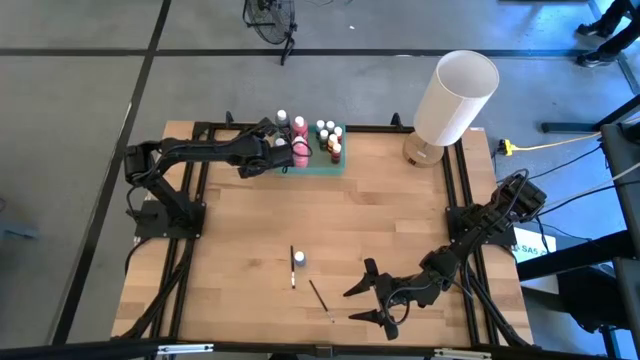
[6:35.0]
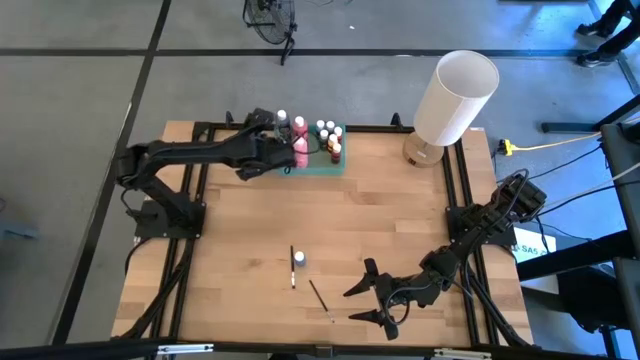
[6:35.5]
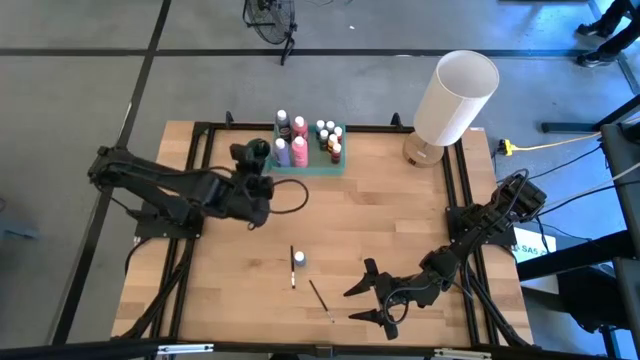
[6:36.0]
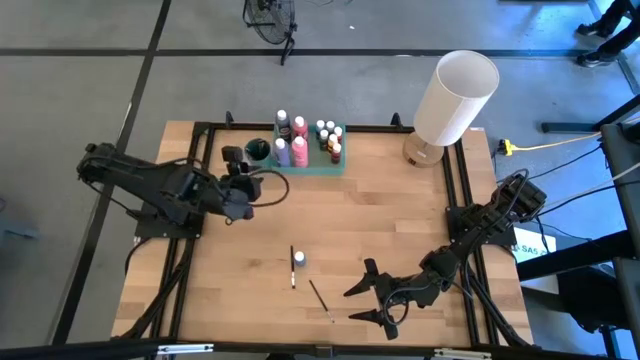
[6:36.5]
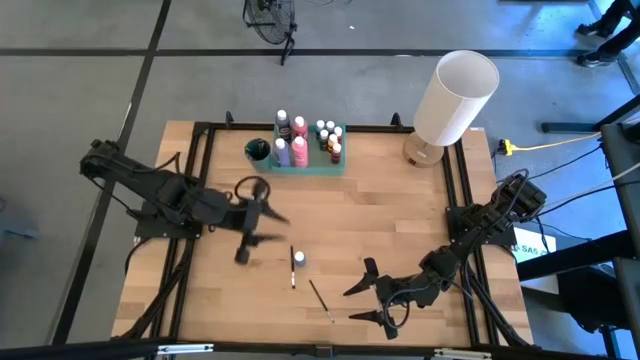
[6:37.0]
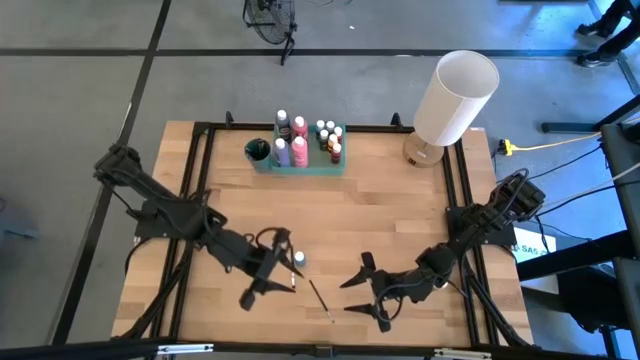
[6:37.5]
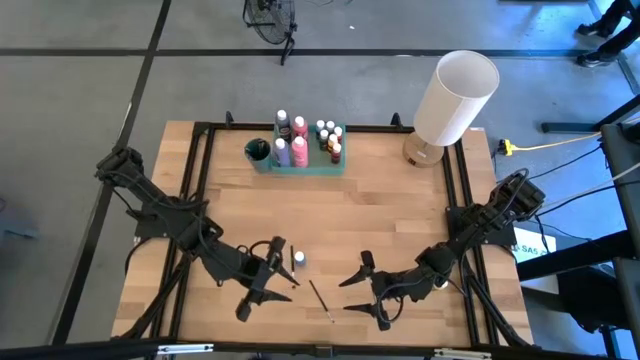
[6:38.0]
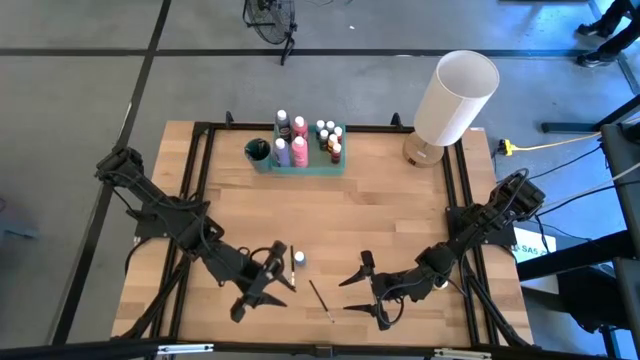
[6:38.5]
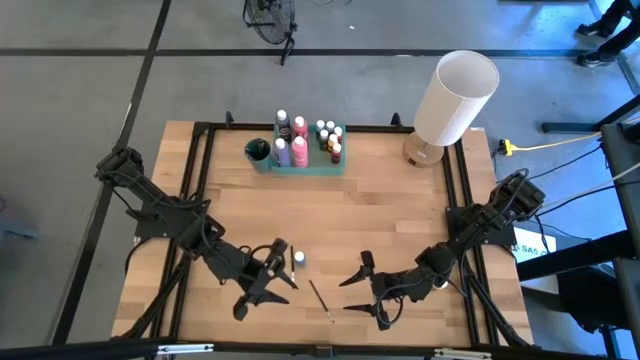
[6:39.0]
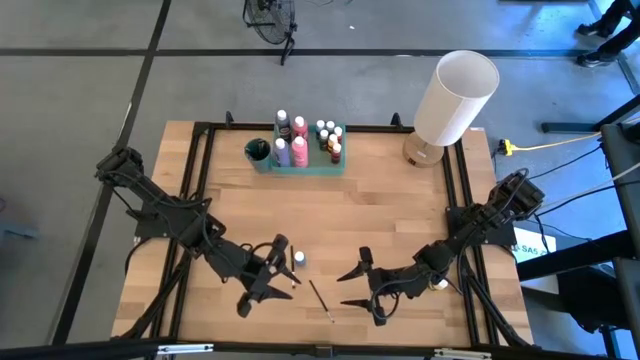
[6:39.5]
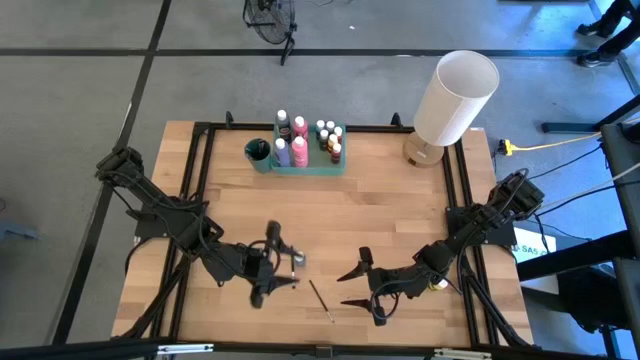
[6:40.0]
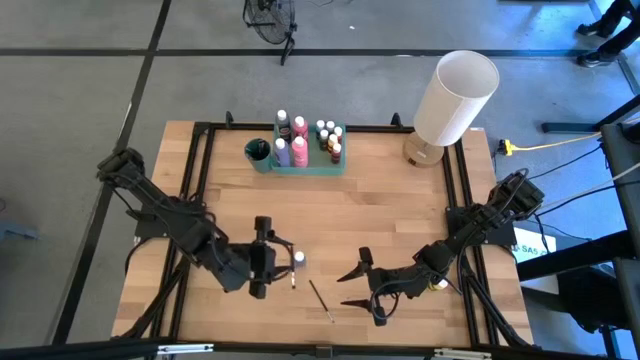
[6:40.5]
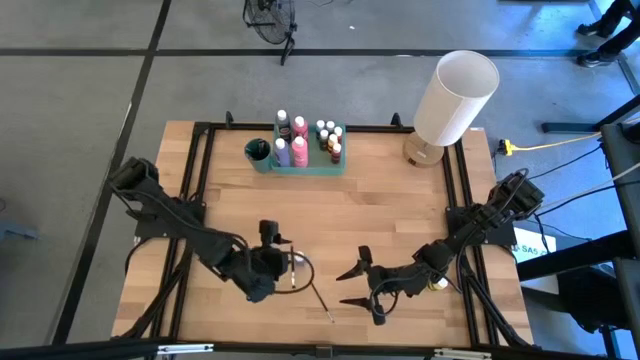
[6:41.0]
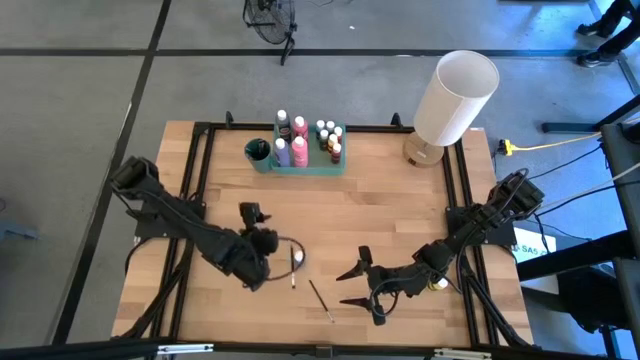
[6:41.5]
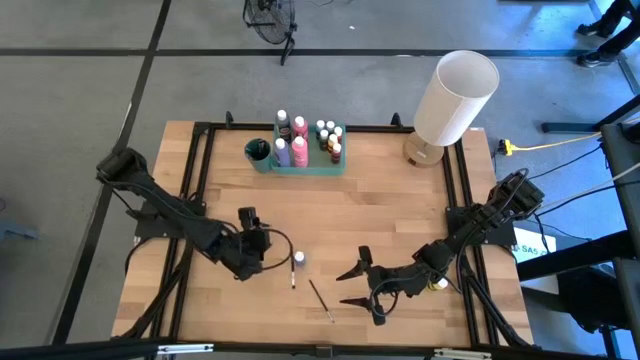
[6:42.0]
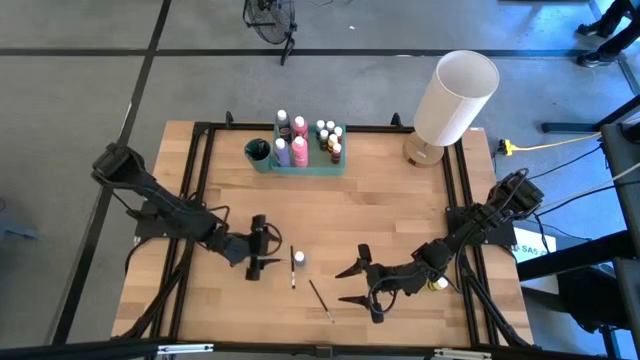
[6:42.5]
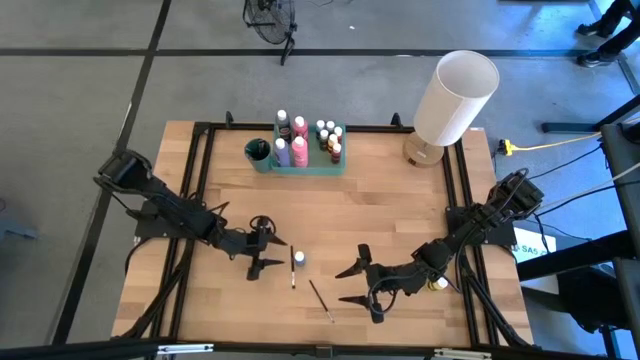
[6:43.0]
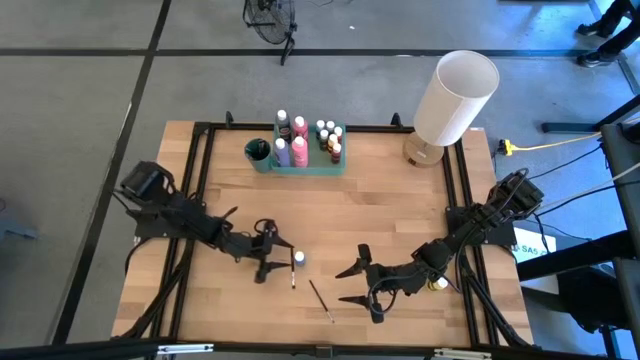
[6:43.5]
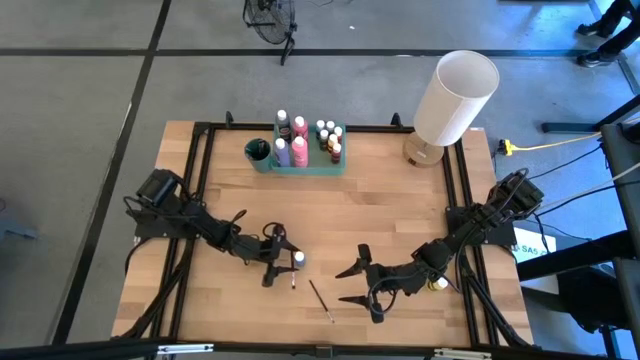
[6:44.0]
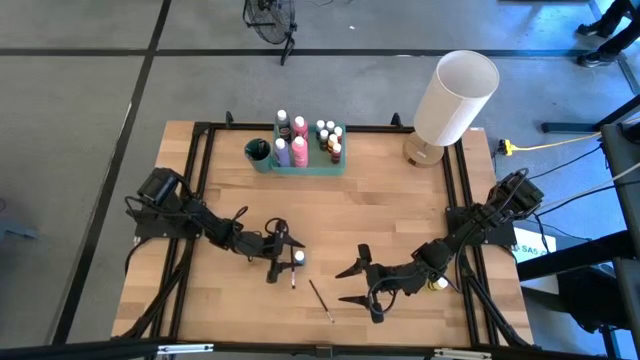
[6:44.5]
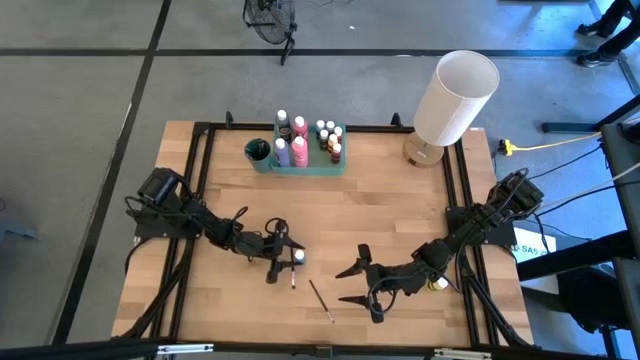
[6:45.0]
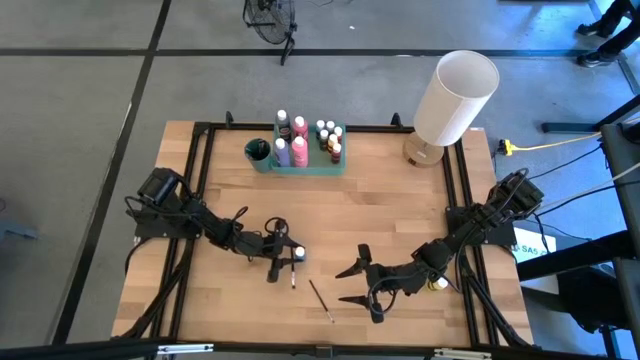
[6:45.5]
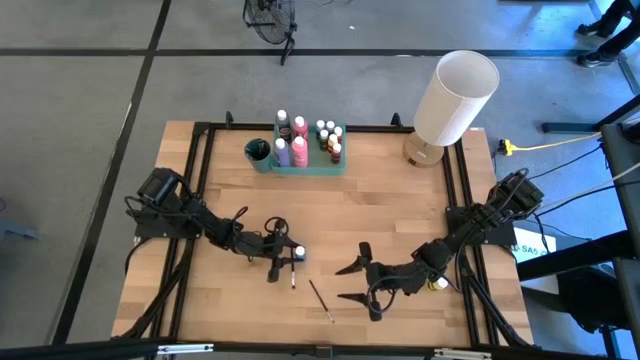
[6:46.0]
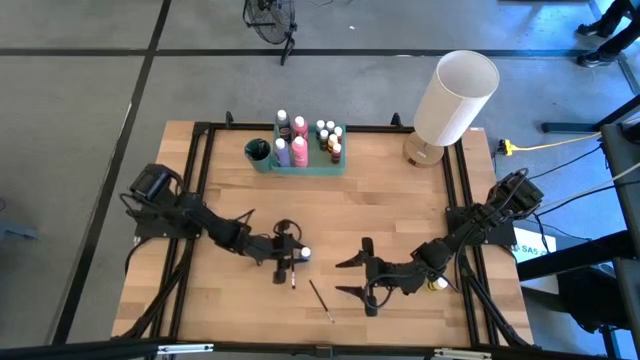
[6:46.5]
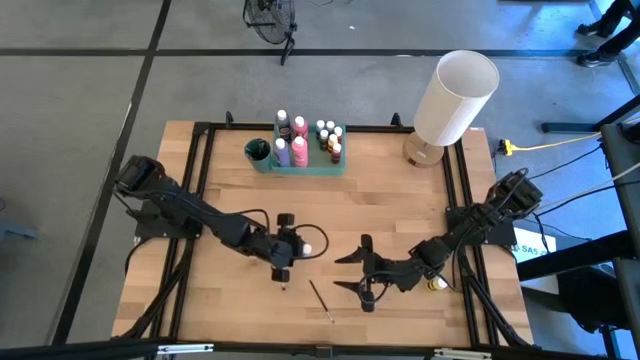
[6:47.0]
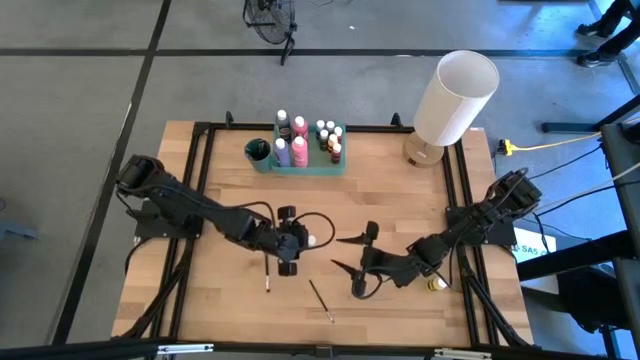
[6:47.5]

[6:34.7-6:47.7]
Task: Pick & Place Paint Supplies
Put the small blue paint bottle into the green bin

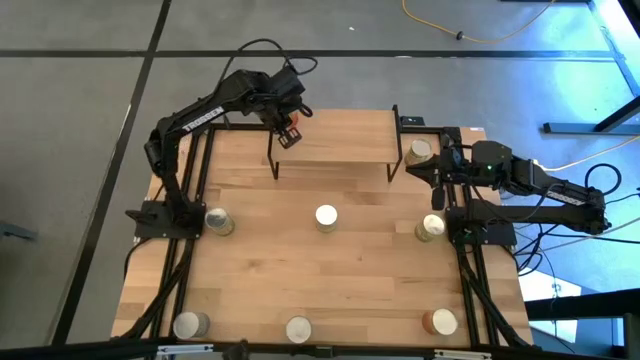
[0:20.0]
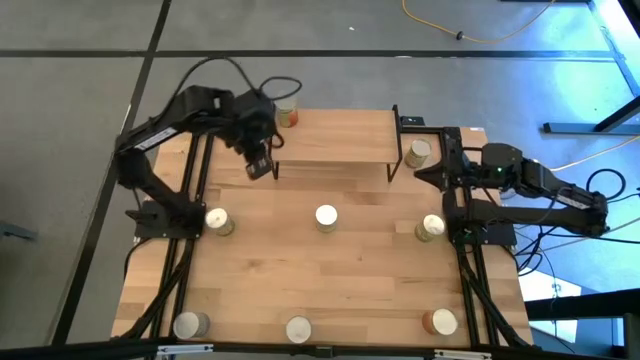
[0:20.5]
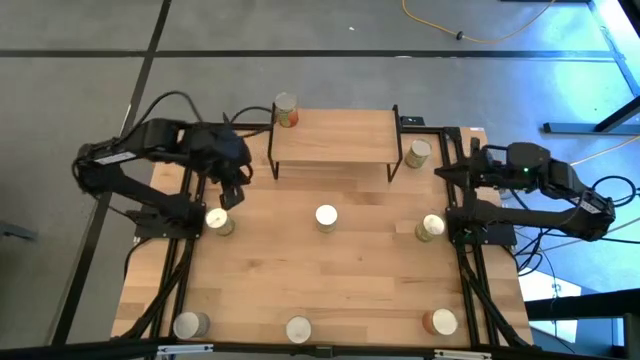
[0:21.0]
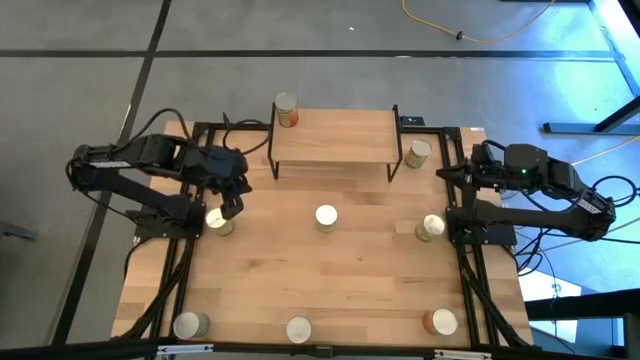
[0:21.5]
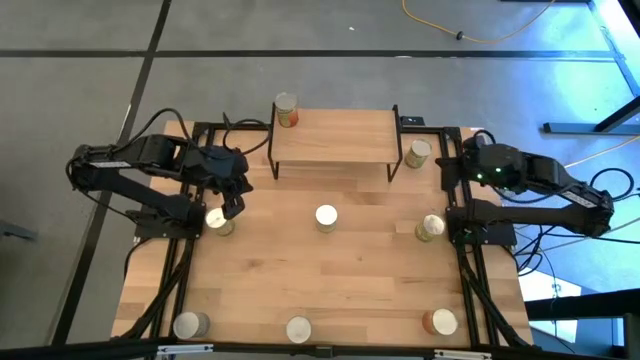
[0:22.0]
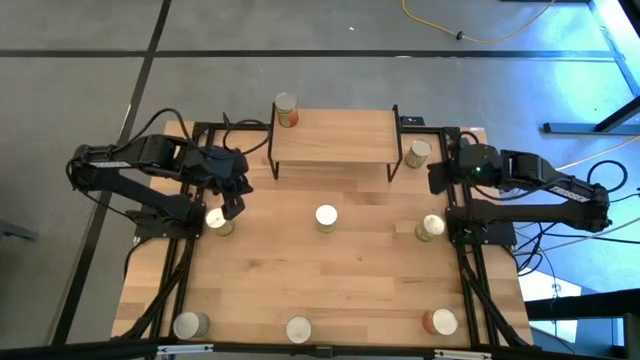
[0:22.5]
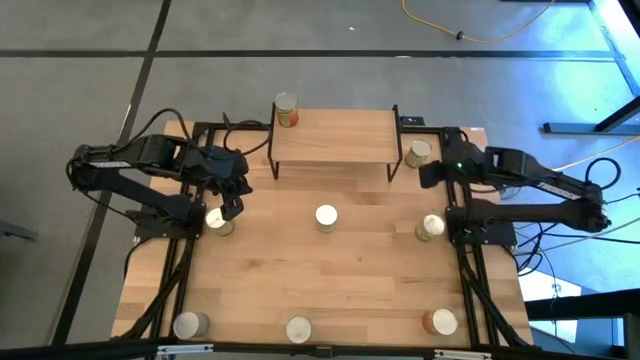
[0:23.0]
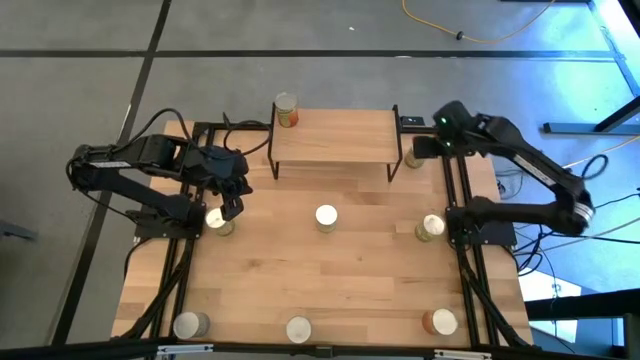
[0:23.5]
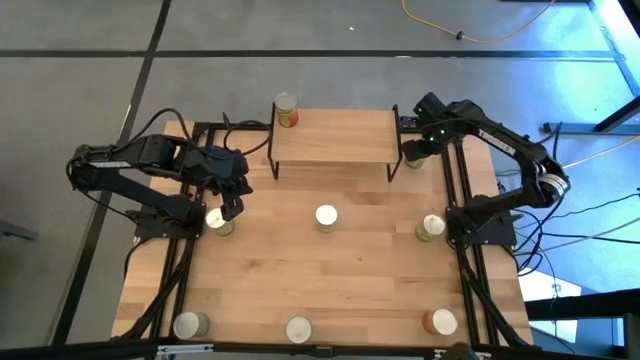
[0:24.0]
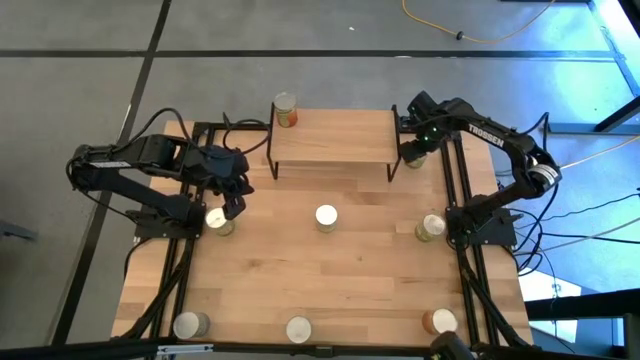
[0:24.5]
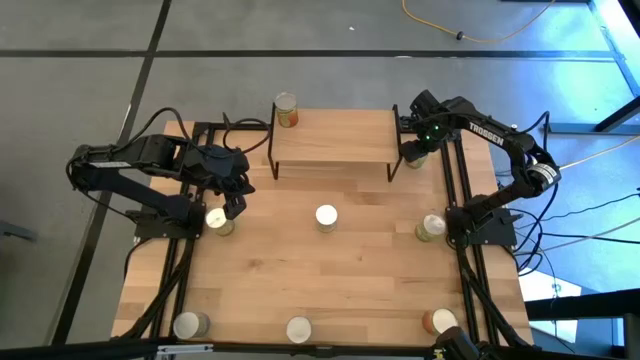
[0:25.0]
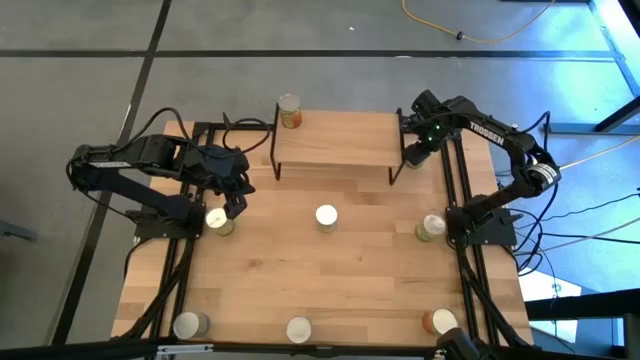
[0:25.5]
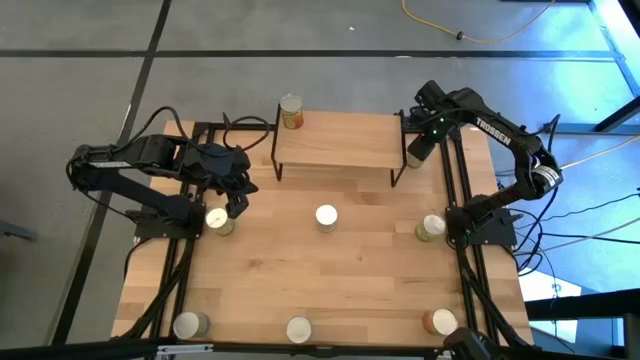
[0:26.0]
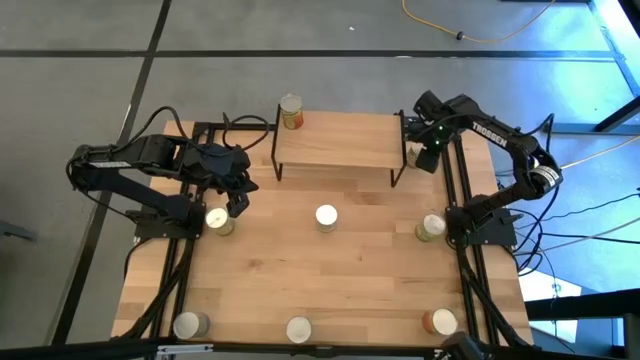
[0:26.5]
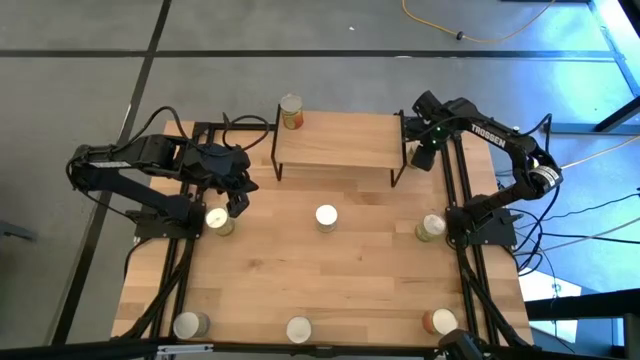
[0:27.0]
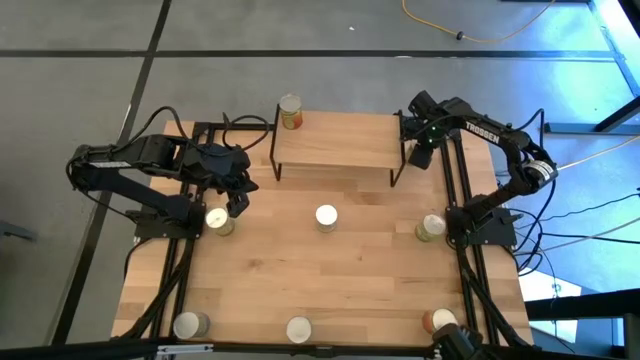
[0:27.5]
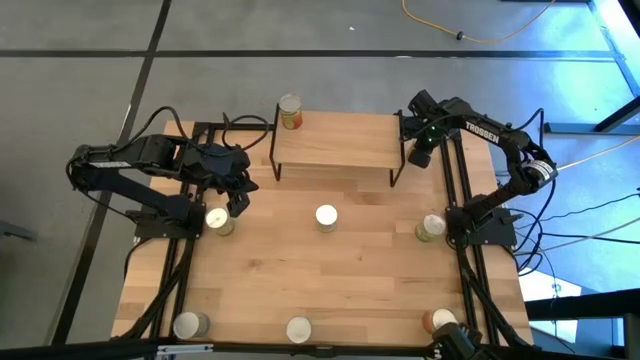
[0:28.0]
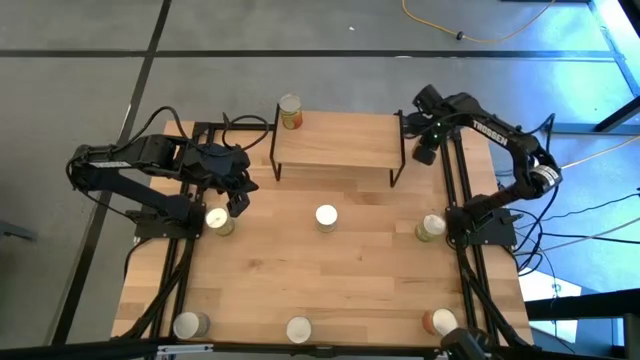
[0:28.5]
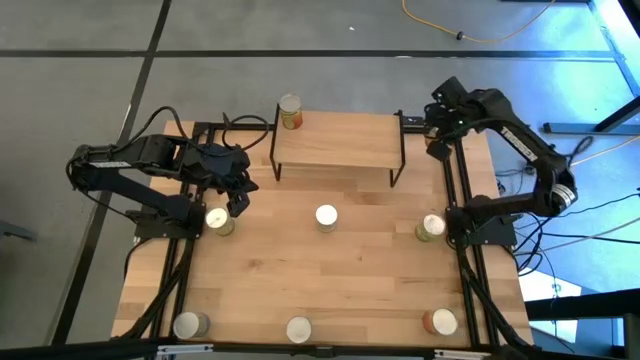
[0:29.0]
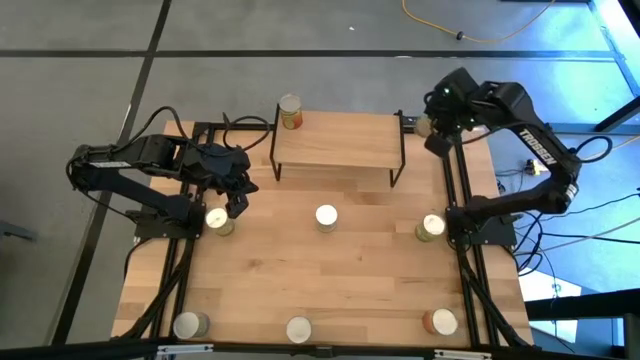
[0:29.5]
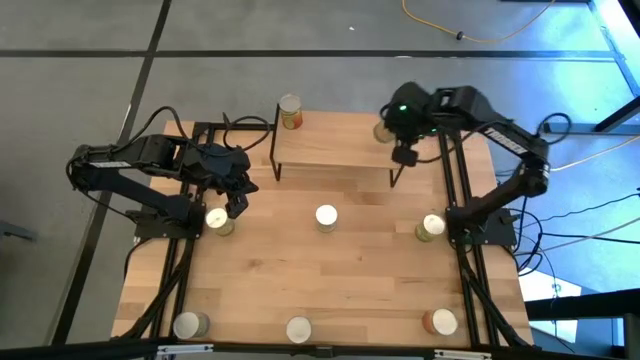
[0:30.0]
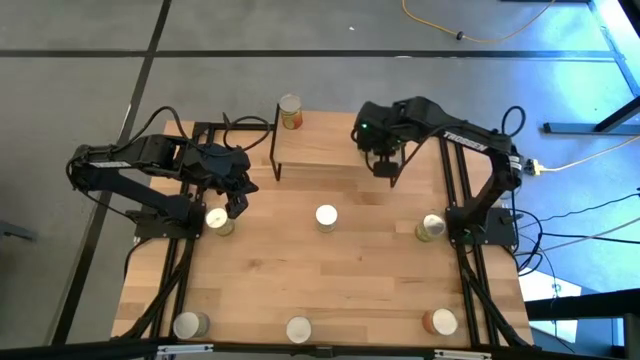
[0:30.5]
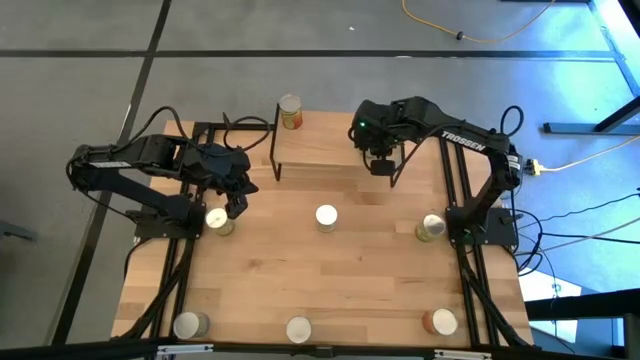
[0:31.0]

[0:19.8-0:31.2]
Task: Pick and place cans onto a shelf
Put the top canned oranges on the shelf
